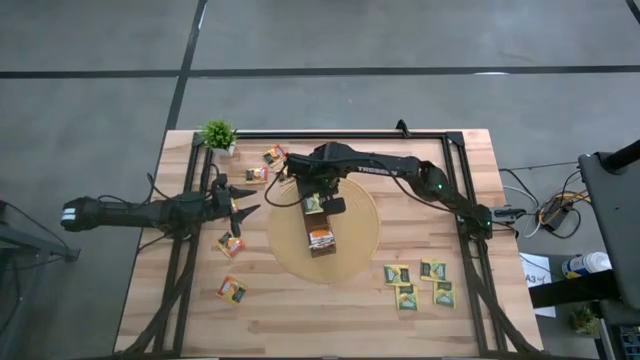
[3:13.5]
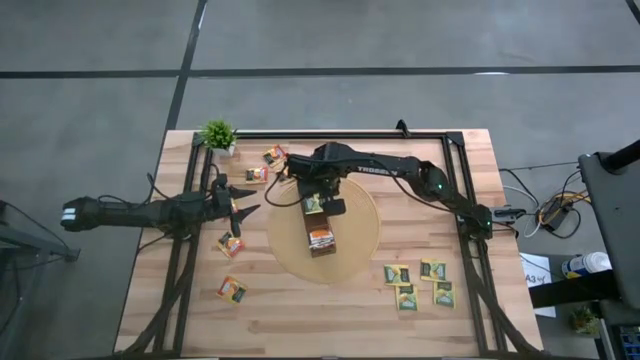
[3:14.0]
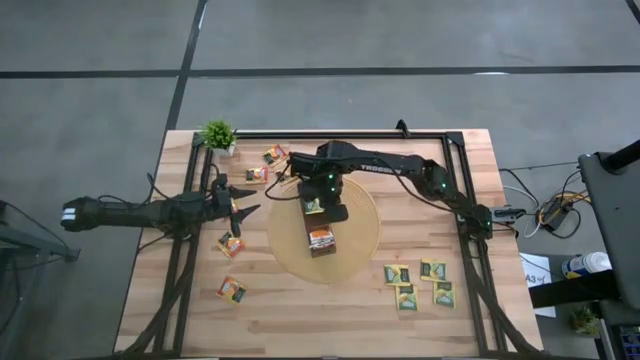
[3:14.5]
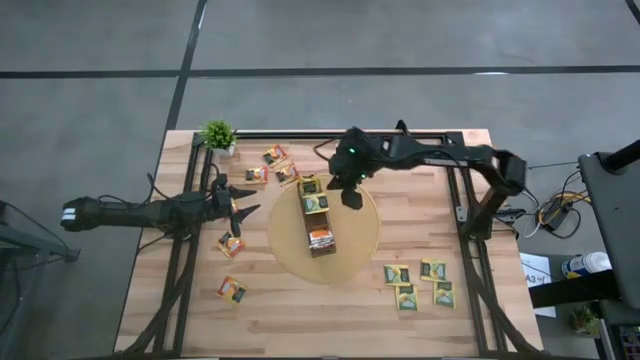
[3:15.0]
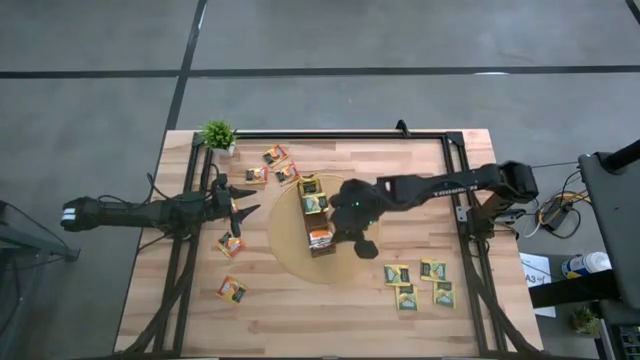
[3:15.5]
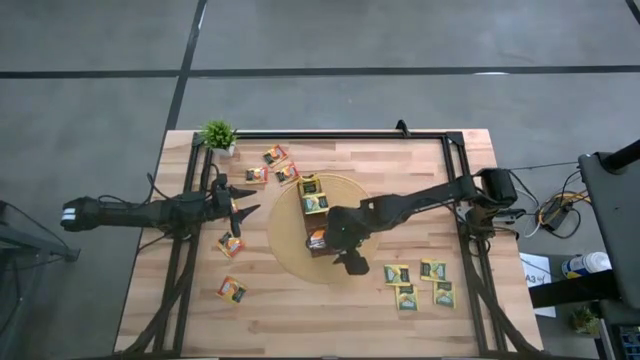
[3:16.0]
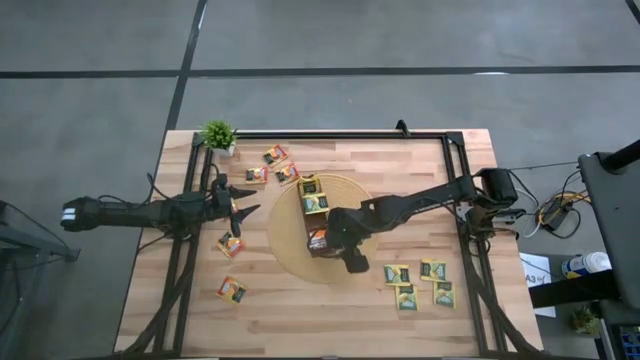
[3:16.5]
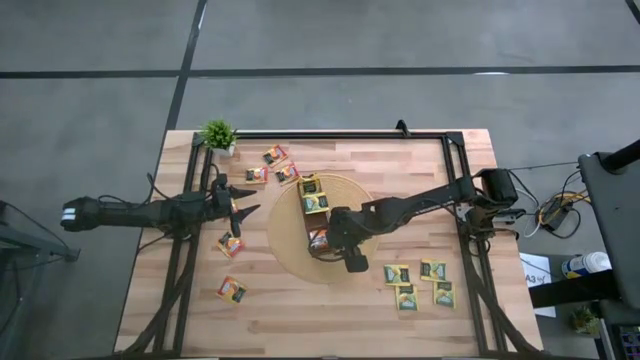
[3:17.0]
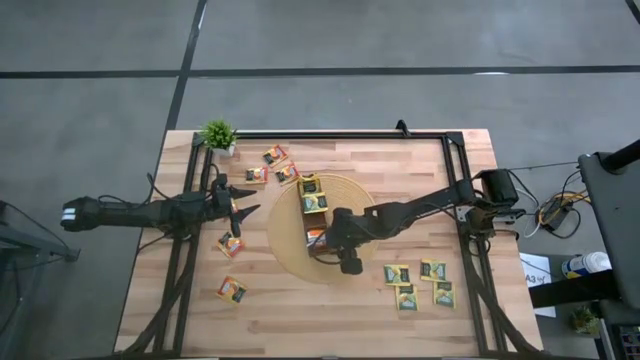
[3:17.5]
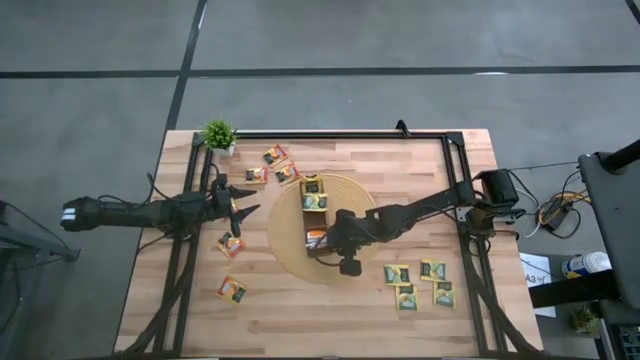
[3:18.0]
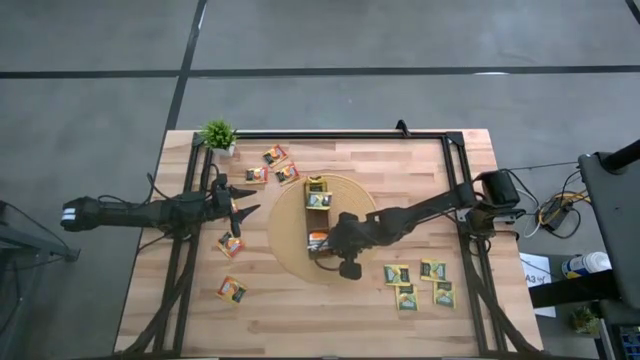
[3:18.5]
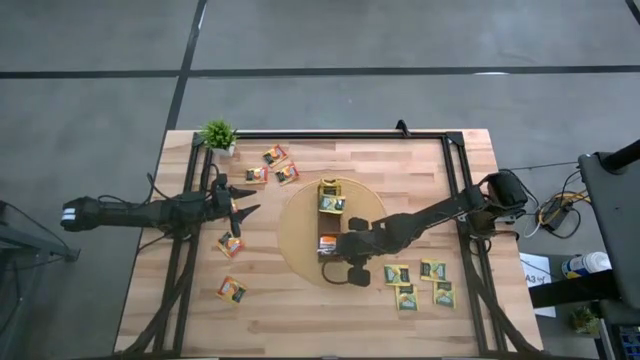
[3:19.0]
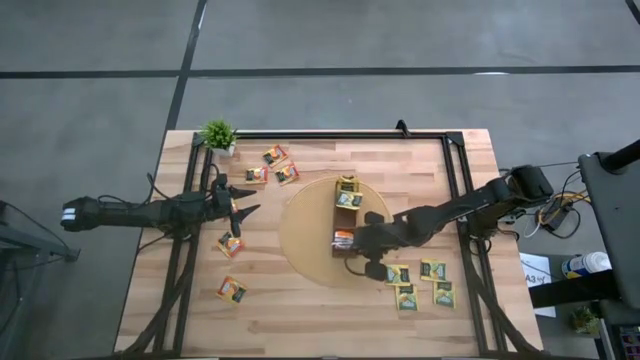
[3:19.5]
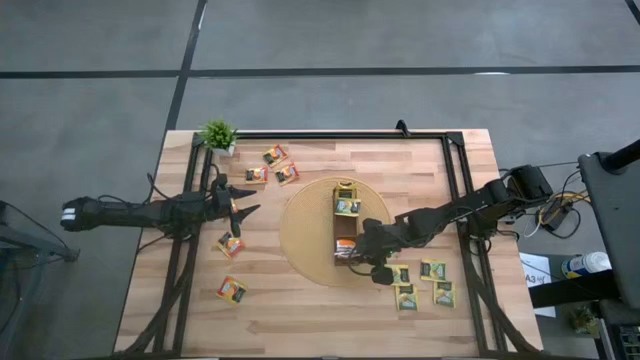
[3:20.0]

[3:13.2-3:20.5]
Task: Pick & Place Tea
Adjust the wooden organizer on the mat

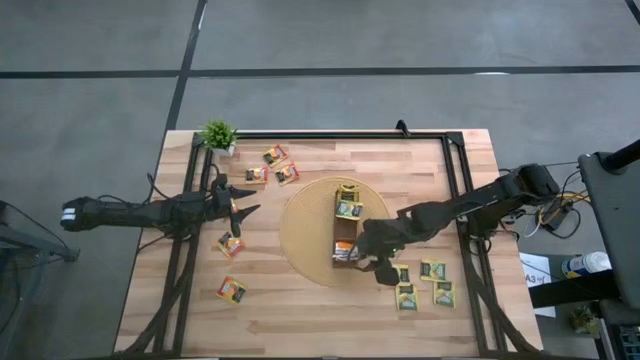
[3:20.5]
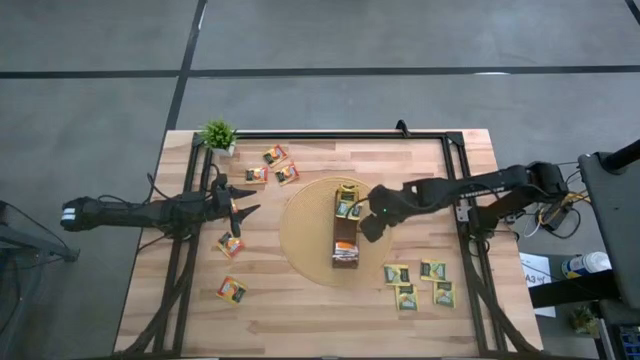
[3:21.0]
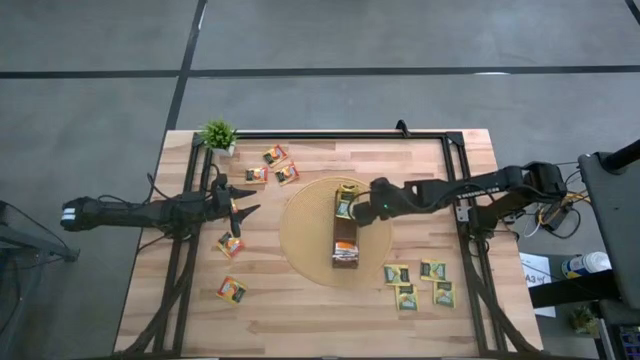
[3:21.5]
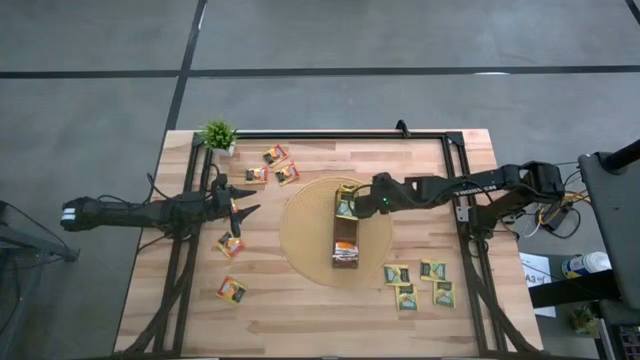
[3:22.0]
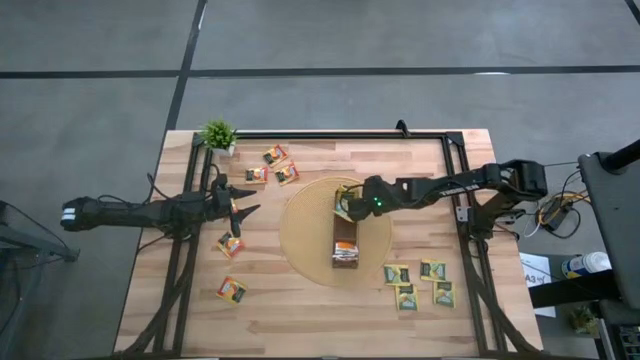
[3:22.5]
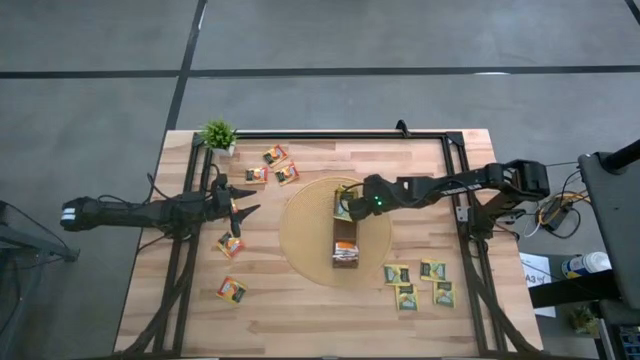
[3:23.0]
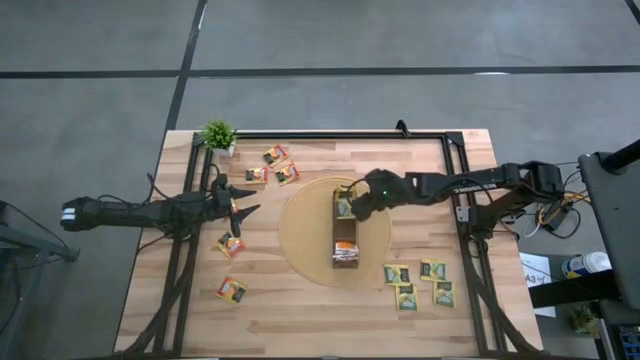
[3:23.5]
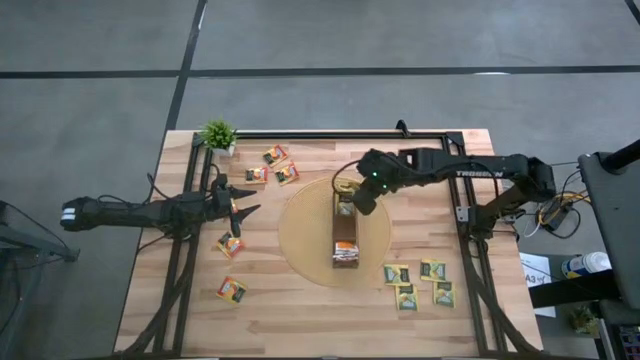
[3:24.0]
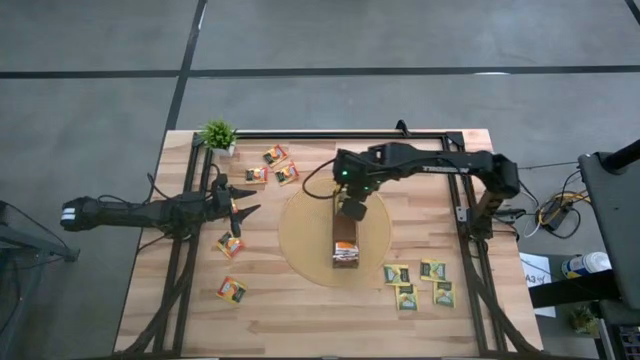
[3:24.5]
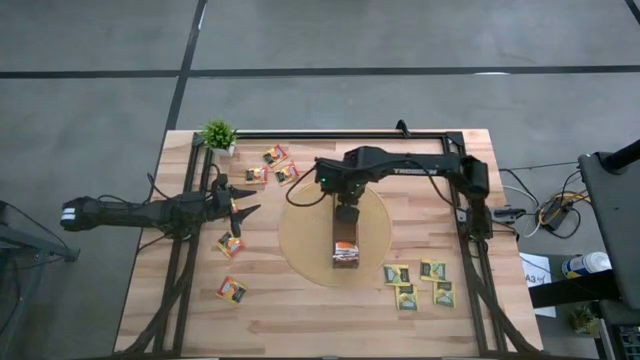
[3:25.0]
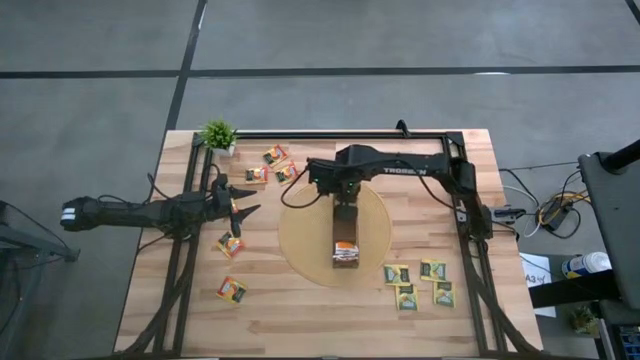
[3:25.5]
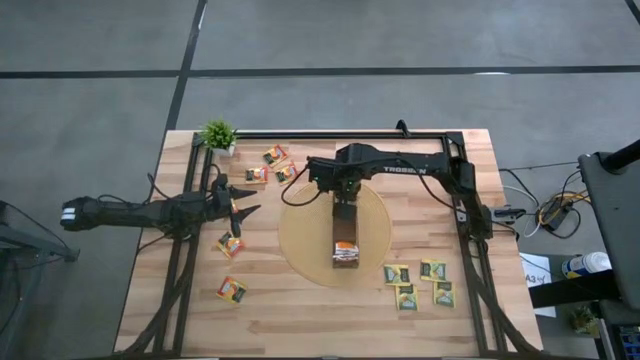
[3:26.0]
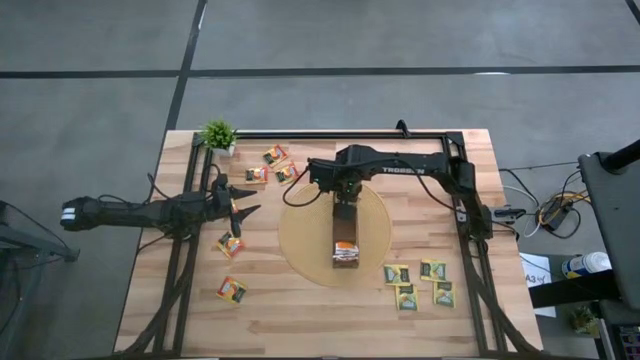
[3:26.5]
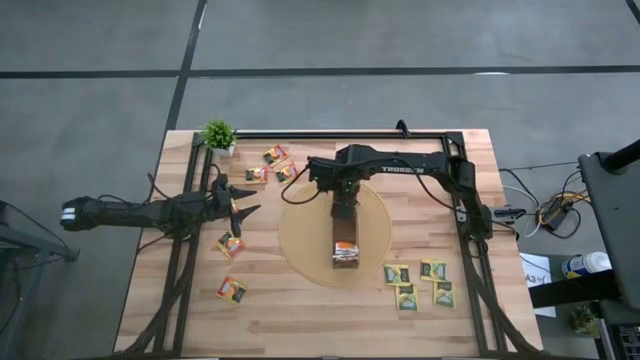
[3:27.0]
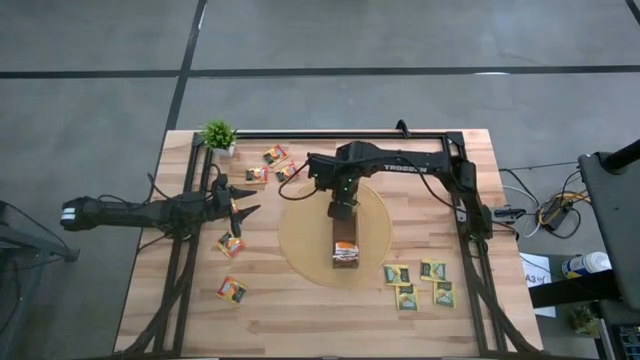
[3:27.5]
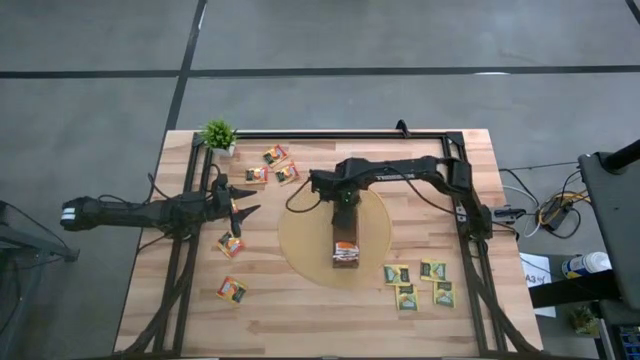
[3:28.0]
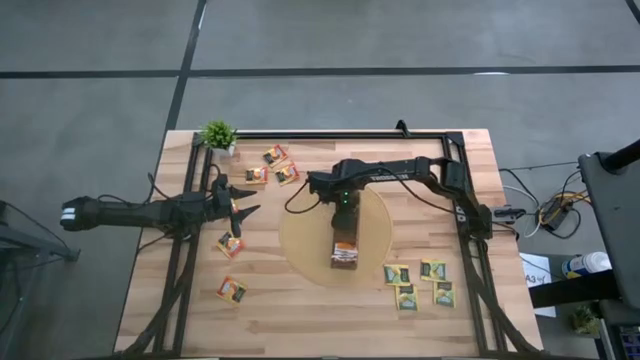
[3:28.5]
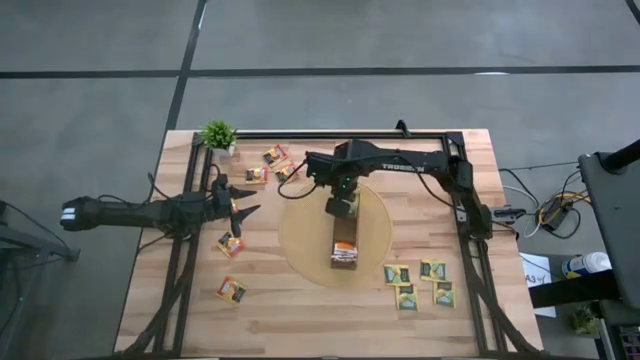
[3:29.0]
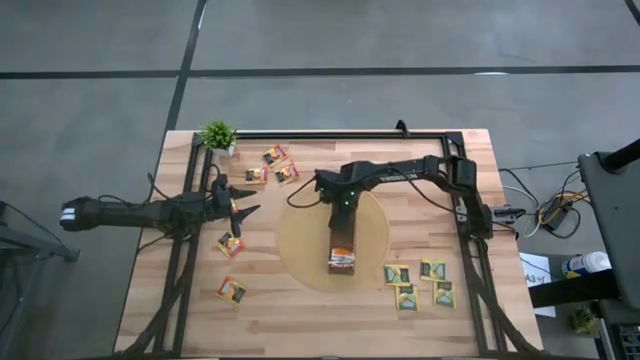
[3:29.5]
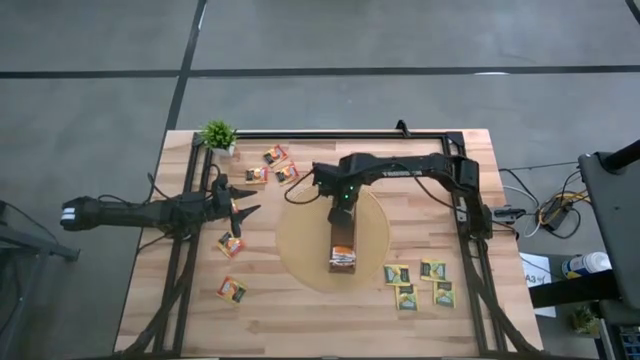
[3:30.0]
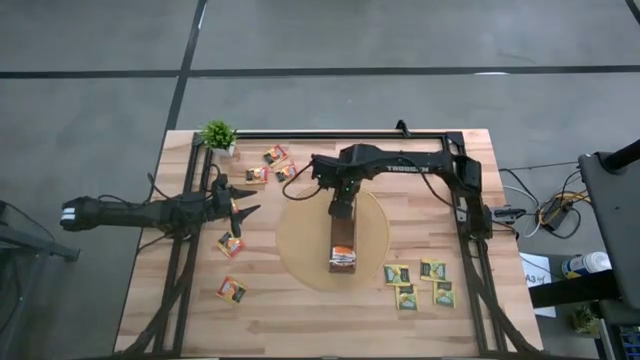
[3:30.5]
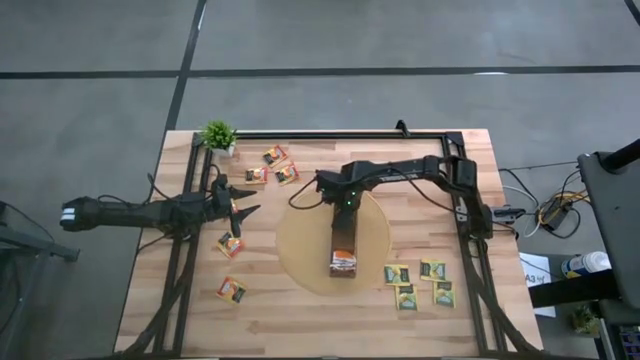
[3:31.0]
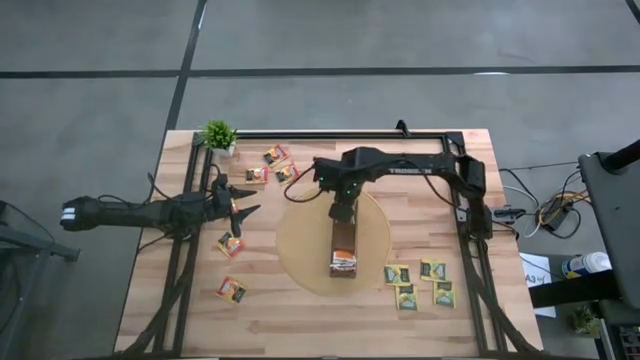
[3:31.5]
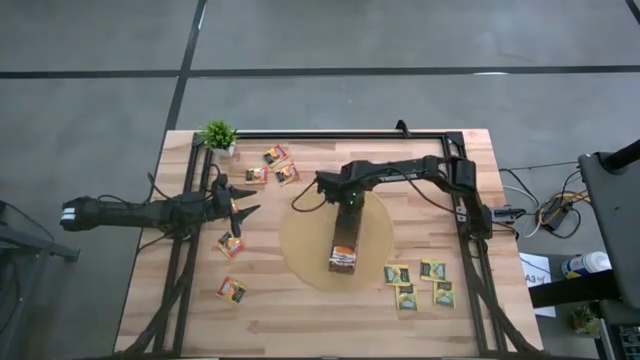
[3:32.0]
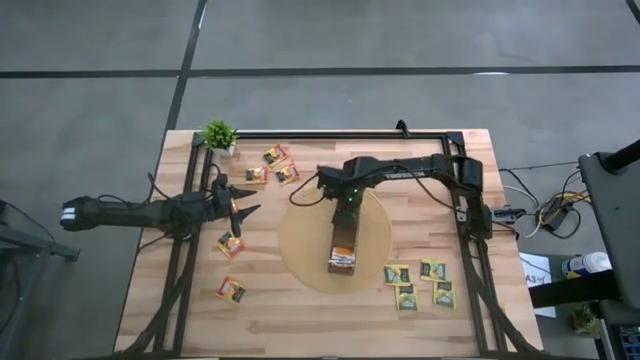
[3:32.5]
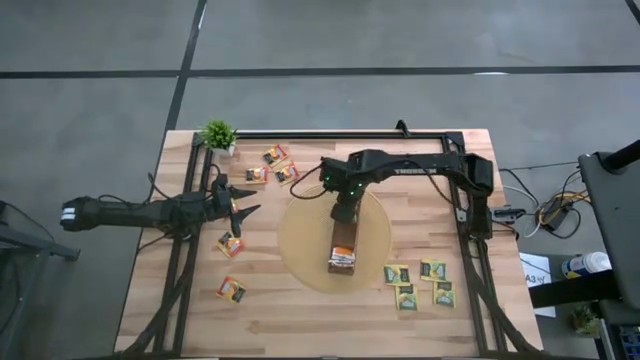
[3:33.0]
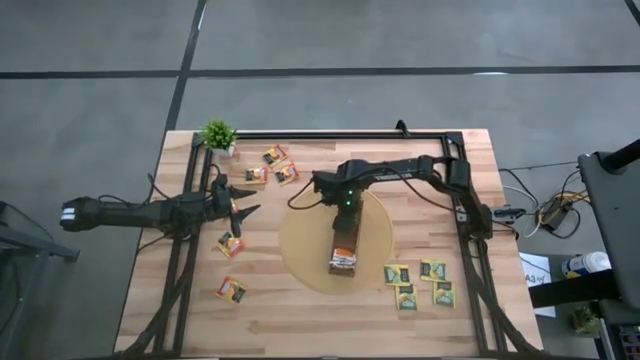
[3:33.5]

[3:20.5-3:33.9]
Put the yellow tea bag into the top section of the wooden organizer

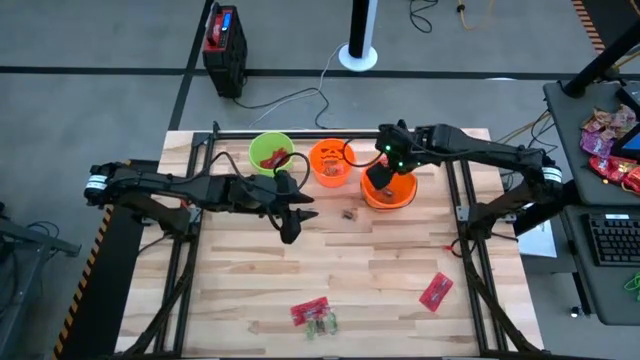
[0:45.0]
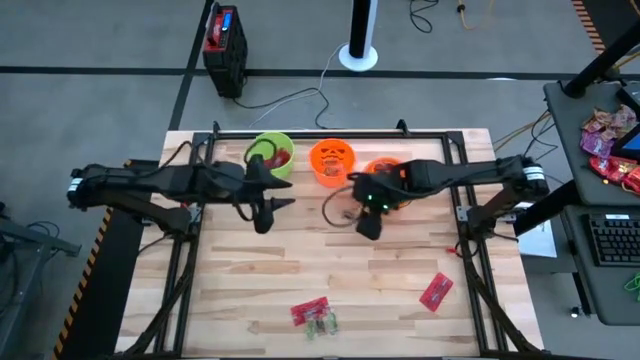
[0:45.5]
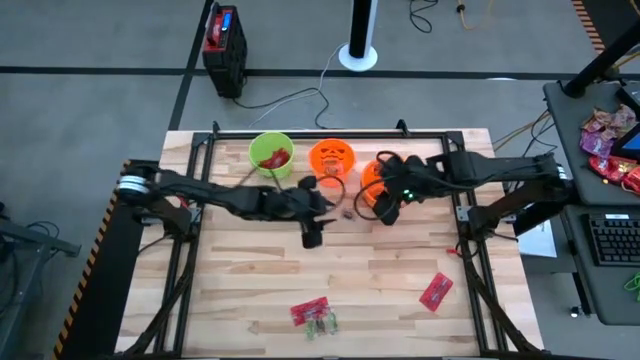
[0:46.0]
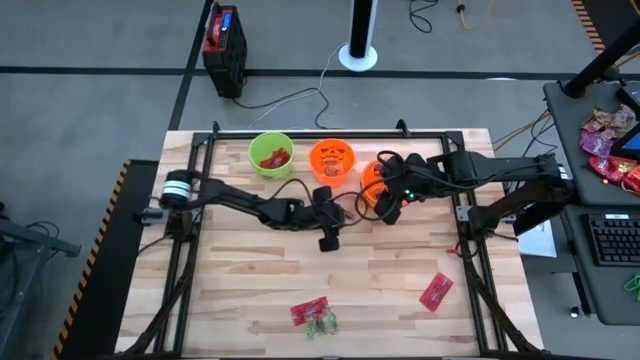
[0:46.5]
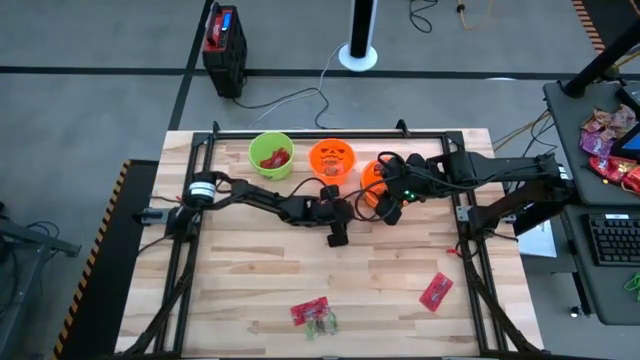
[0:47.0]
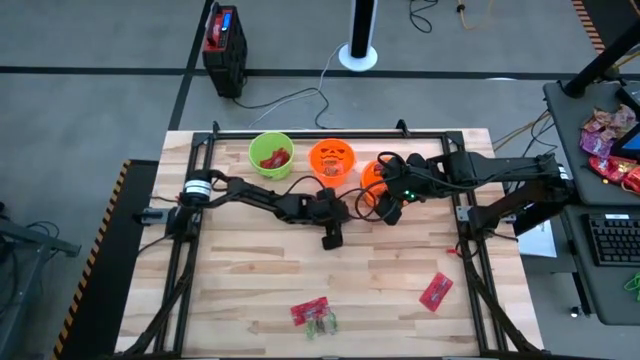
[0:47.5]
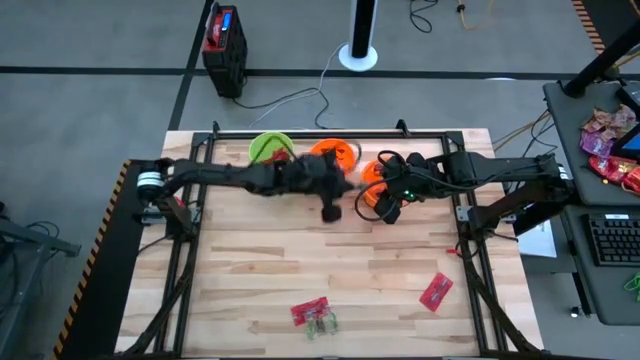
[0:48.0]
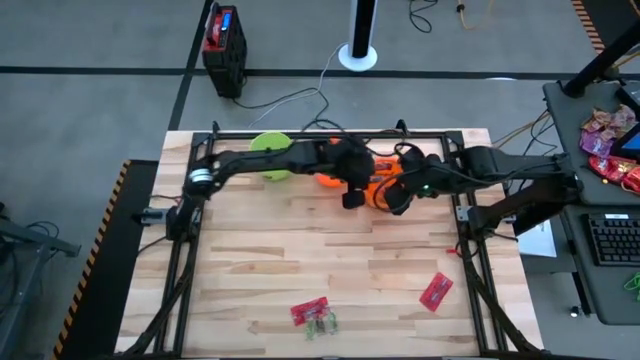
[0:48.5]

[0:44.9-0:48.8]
Task: Sort candy by brand, put in halloween buckets
Put the black candy into the right orange bucket
